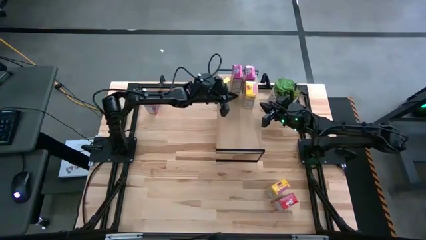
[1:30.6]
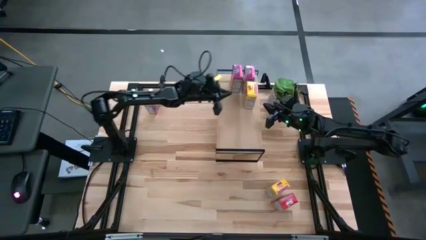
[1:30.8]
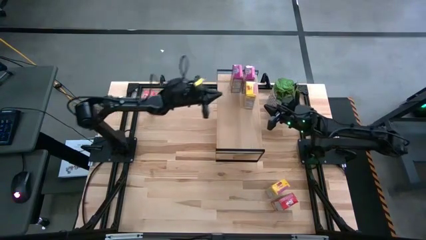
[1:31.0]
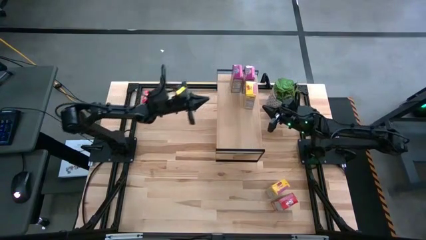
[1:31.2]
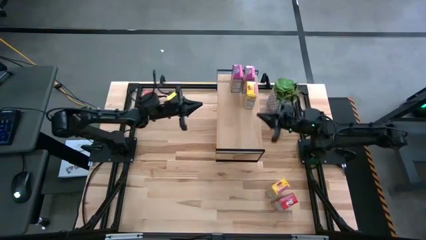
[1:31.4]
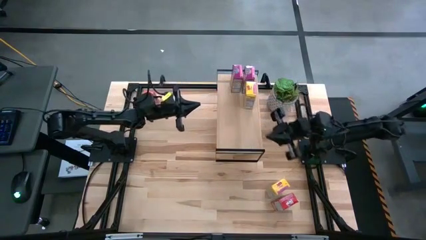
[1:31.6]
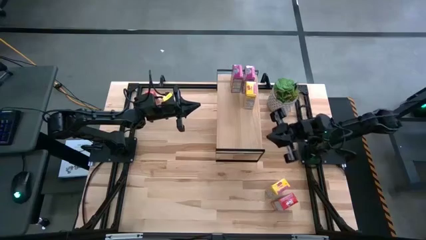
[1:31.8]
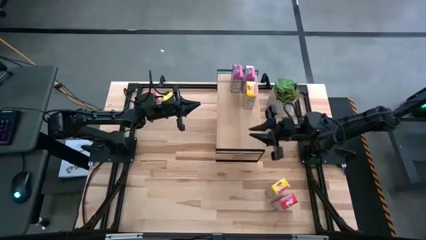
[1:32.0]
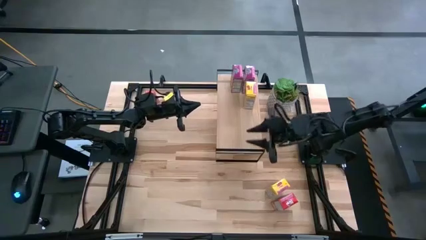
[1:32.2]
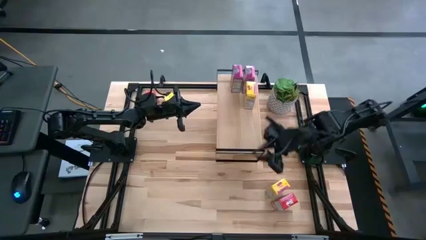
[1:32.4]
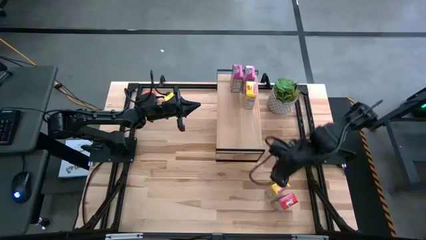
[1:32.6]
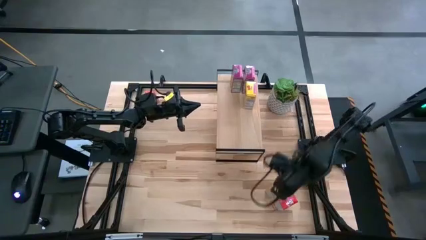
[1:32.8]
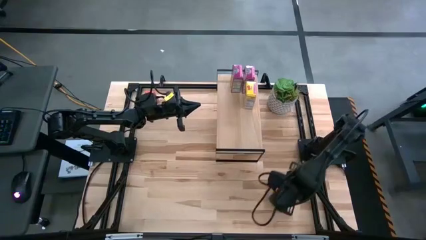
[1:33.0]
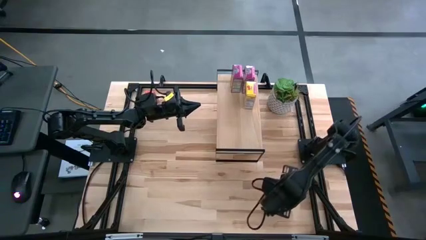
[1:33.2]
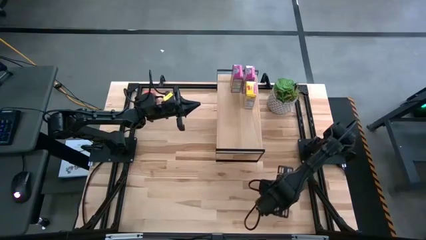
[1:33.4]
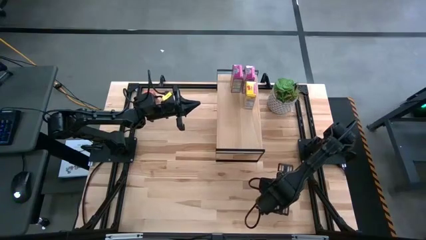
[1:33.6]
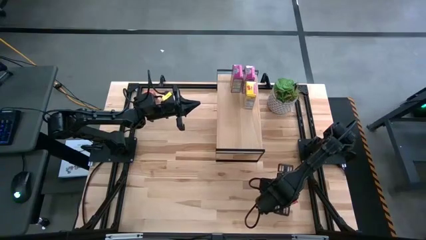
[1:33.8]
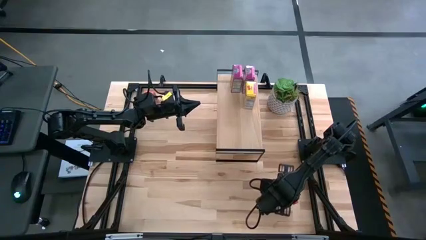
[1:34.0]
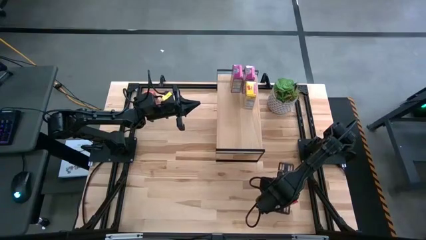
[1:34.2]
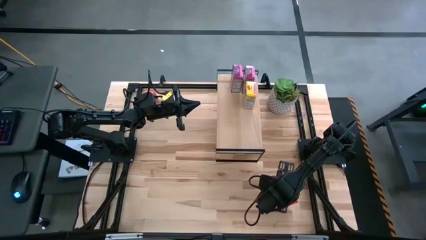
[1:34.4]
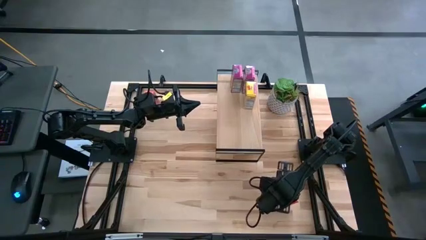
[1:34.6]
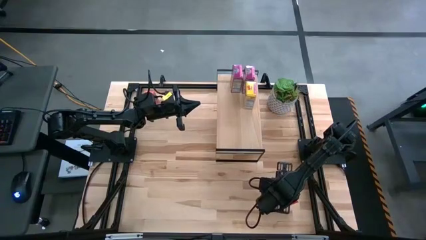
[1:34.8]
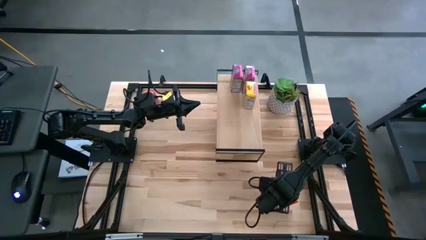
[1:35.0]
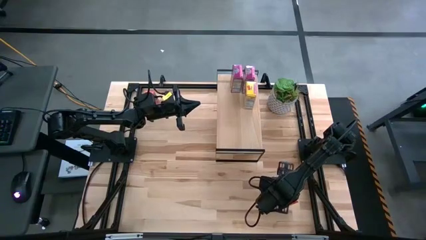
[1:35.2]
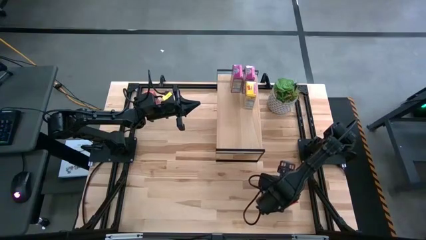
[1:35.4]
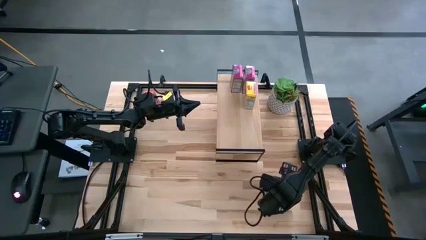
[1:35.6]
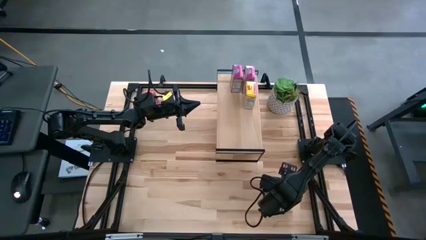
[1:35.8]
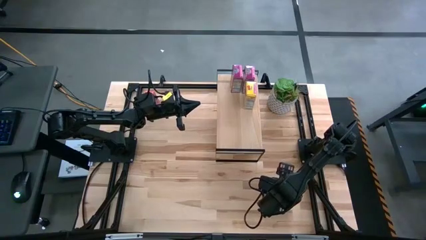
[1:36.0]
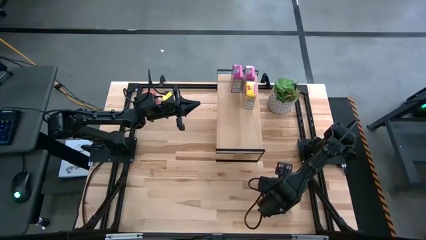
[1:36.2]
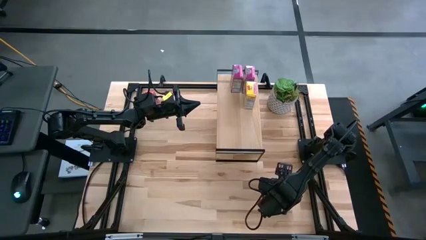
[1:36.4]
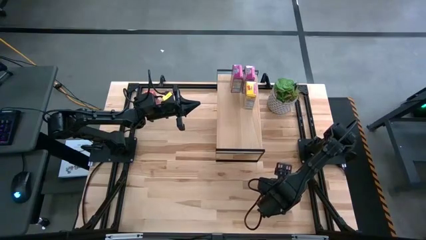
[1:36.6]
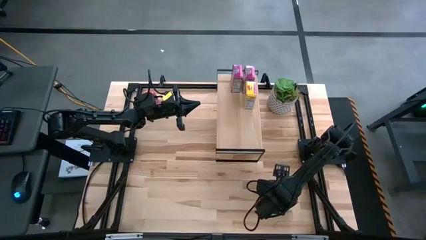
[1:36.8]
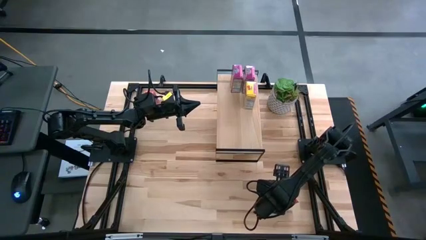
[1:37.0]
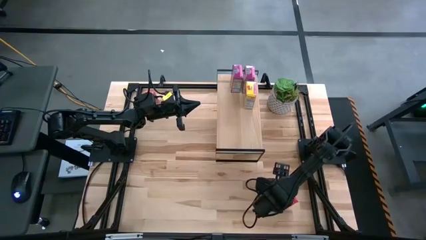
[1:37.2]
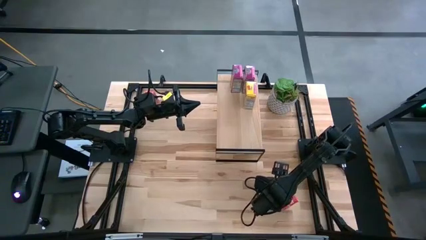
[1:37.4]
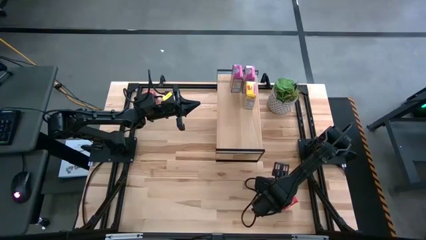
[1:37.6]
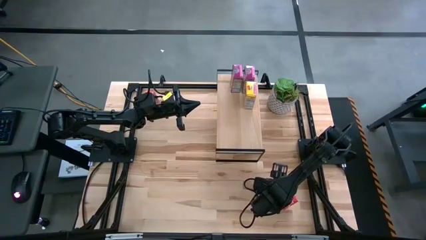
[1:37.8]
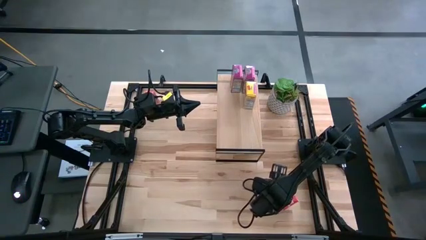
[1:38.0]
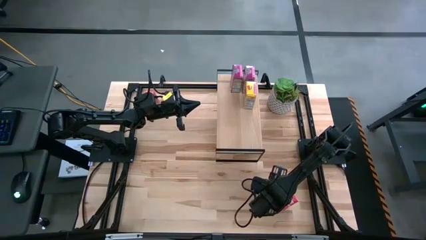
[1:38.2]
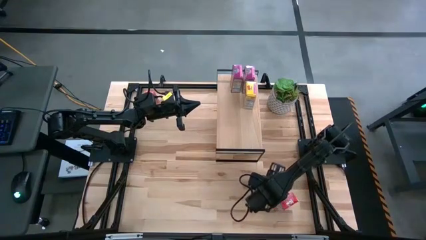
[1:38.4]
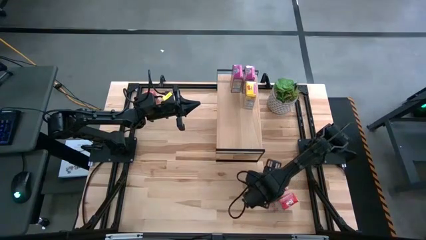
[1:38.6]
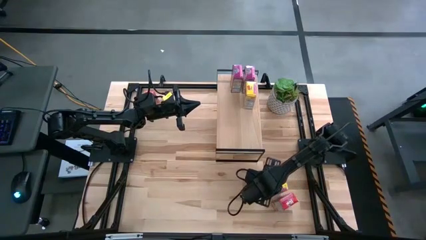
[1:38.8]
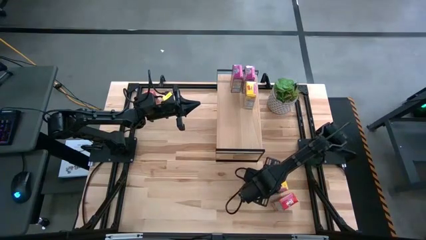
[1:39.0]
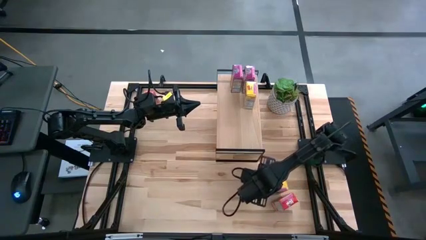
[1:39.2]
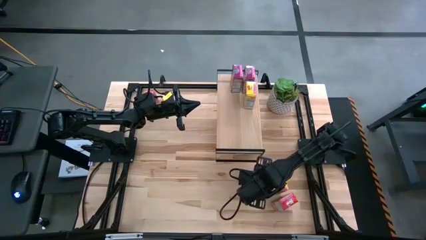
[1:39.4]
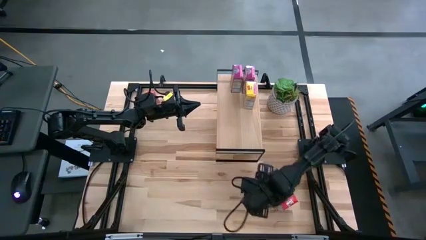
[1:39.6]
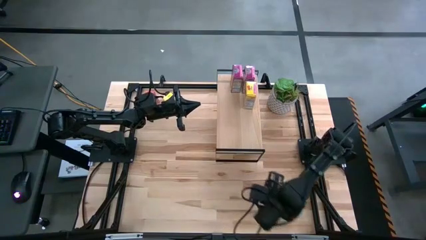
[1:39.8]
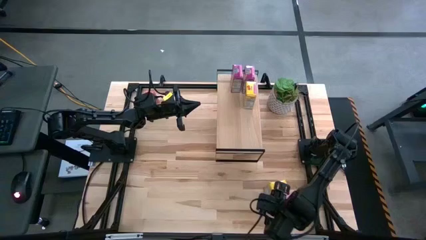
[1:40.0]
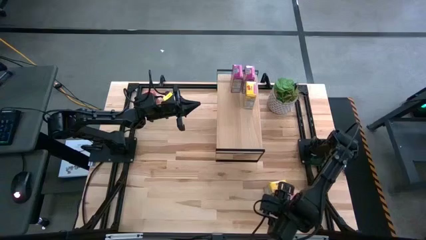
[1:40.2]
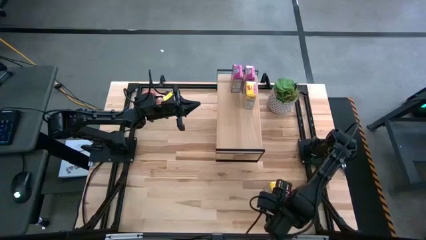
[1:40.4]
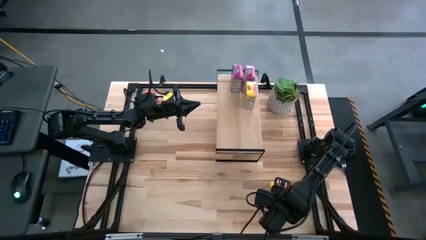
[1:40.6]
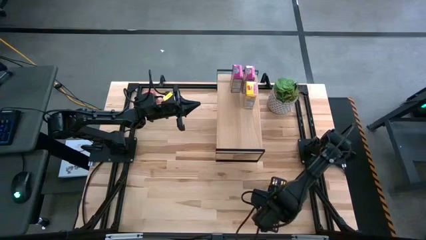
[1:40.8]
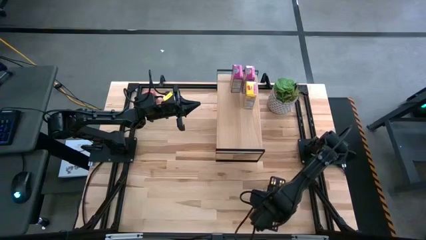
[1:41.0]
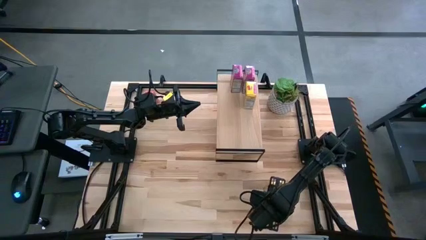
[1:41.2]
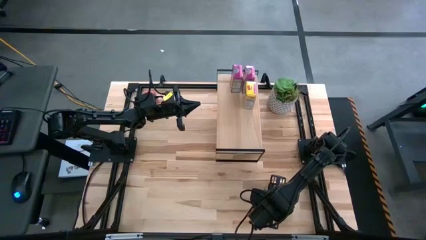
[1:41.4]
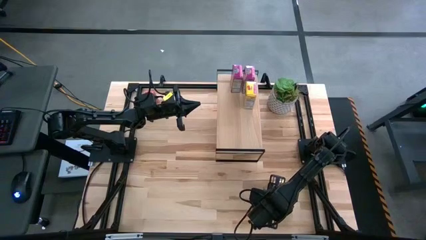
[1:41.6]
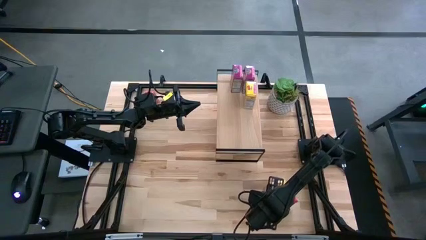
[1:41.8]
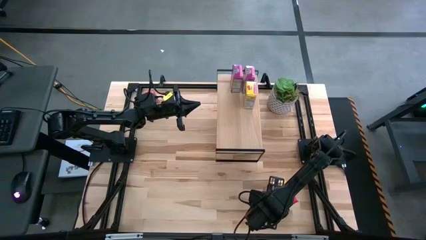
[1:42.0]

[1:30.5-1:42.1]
Task: Stack cereal on shelf
Put the yellow cereal box on the shelf aligned with the yellow cereal box
